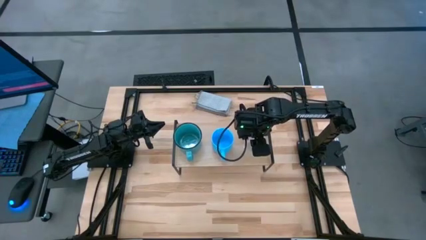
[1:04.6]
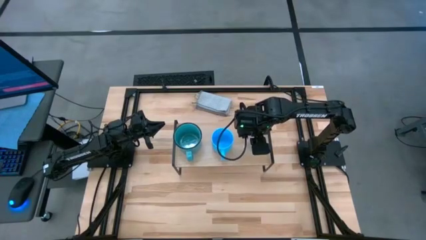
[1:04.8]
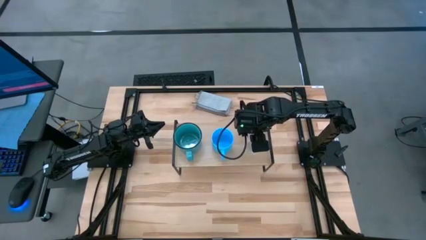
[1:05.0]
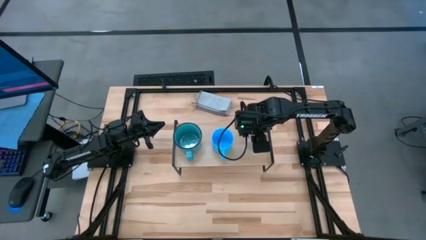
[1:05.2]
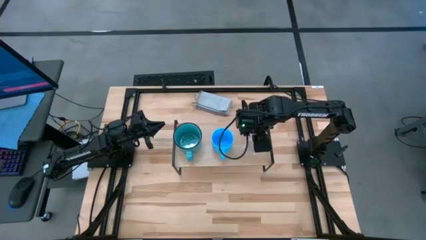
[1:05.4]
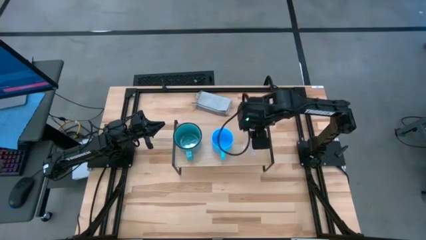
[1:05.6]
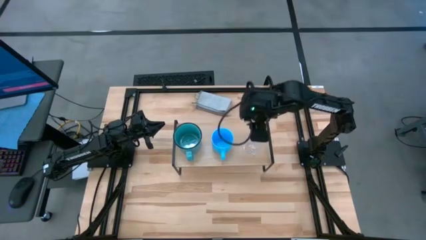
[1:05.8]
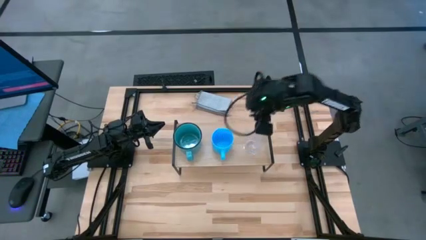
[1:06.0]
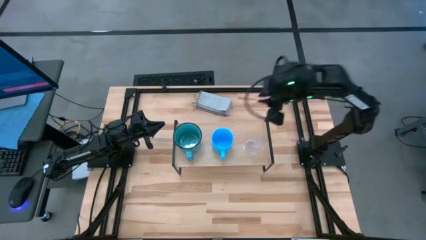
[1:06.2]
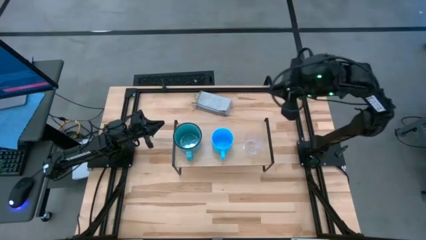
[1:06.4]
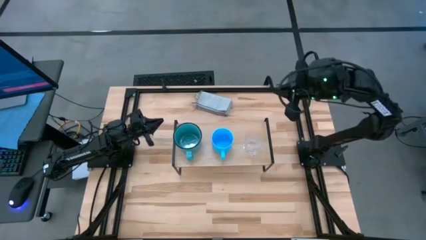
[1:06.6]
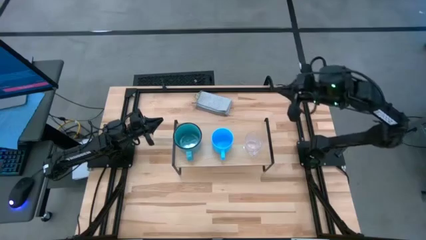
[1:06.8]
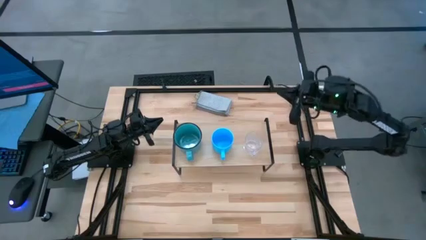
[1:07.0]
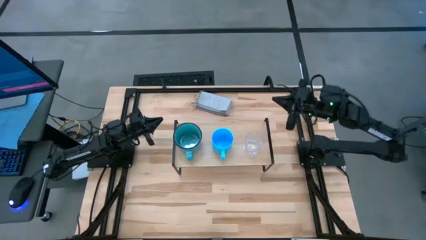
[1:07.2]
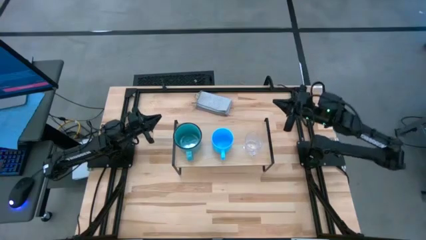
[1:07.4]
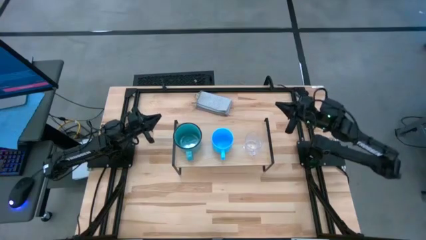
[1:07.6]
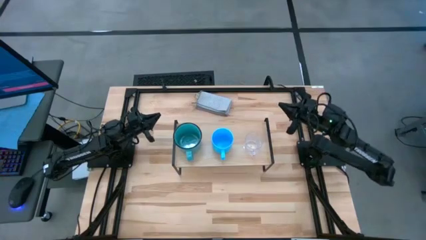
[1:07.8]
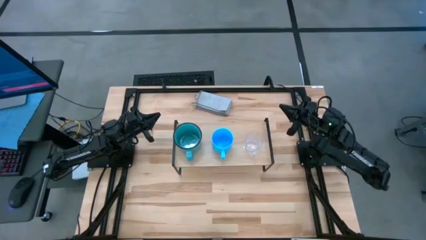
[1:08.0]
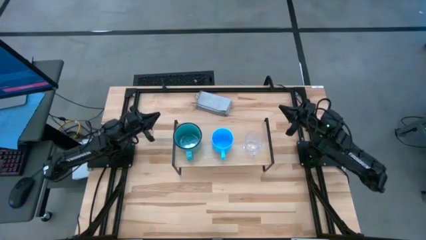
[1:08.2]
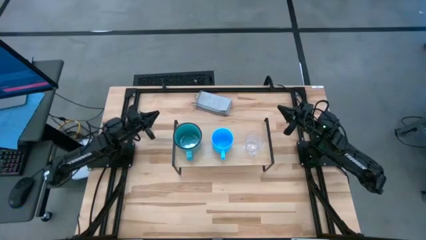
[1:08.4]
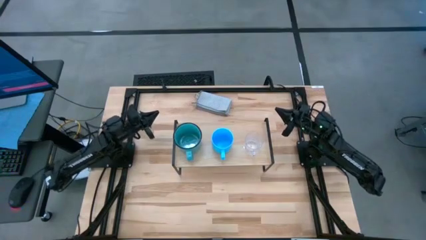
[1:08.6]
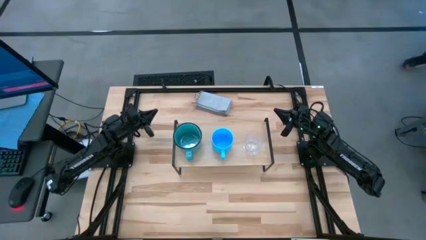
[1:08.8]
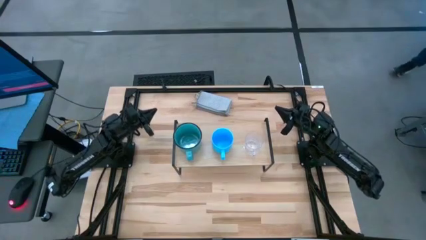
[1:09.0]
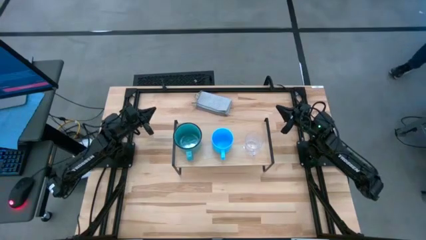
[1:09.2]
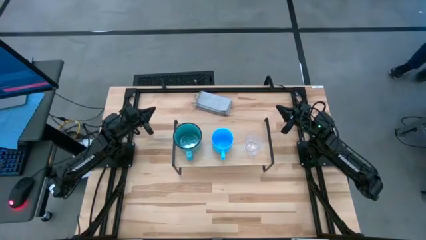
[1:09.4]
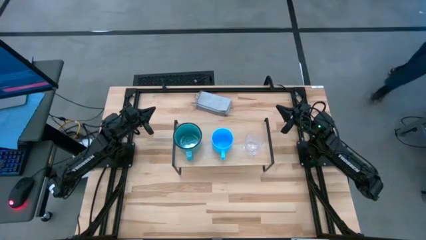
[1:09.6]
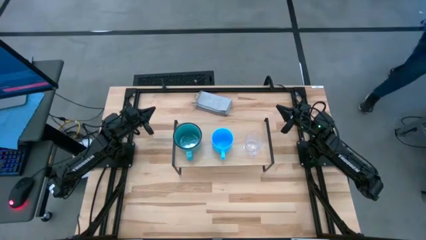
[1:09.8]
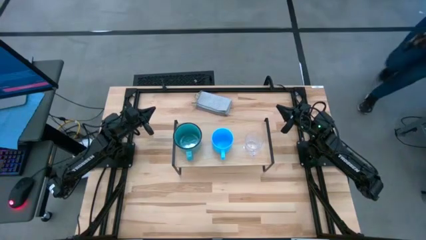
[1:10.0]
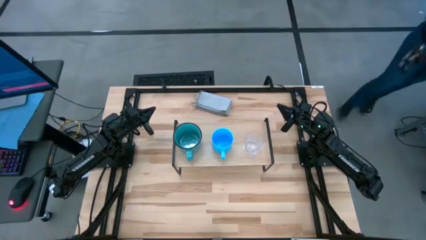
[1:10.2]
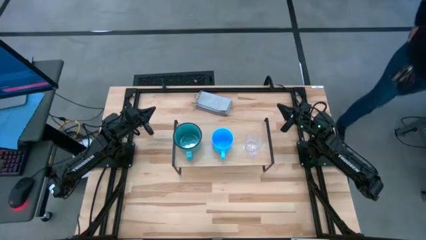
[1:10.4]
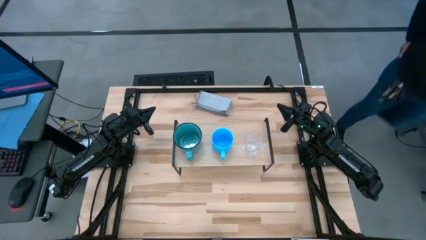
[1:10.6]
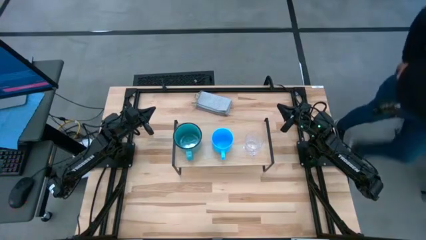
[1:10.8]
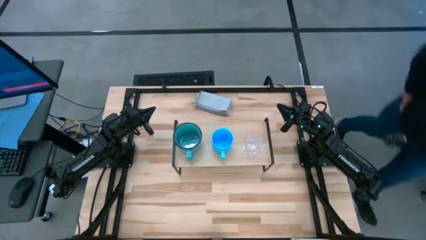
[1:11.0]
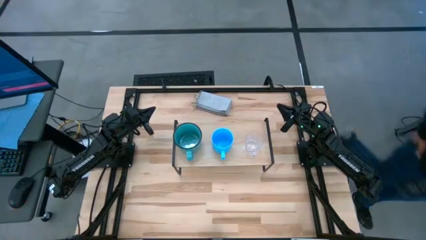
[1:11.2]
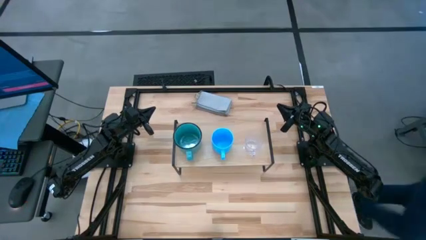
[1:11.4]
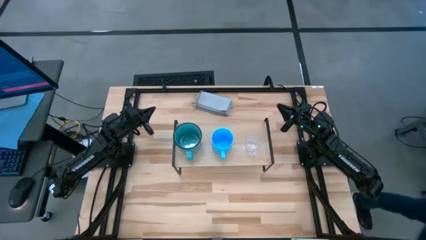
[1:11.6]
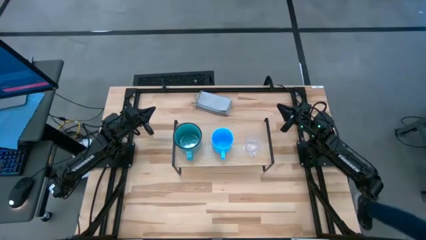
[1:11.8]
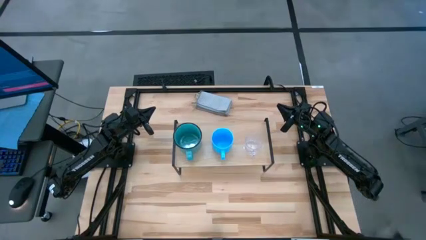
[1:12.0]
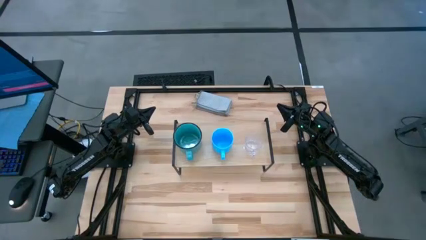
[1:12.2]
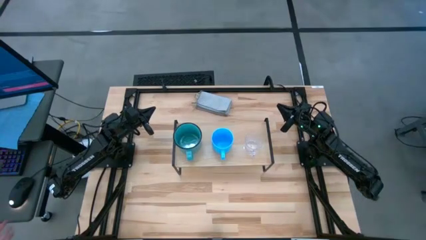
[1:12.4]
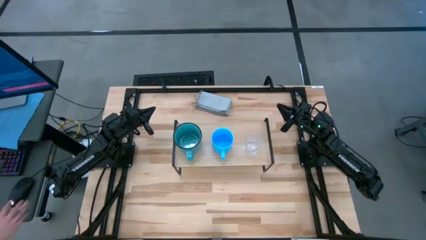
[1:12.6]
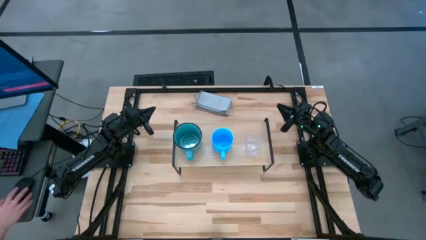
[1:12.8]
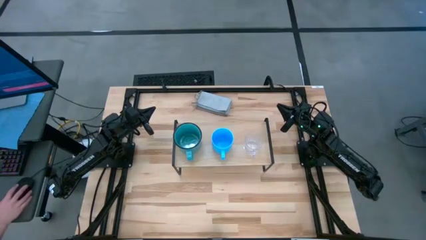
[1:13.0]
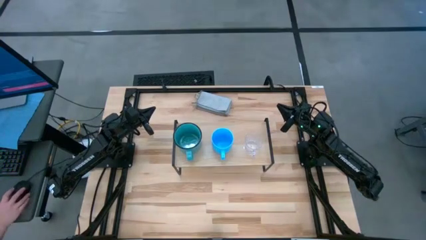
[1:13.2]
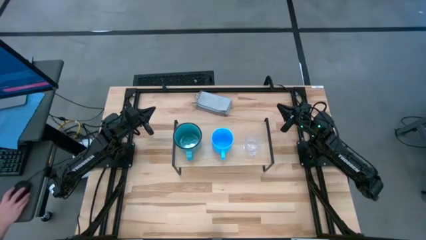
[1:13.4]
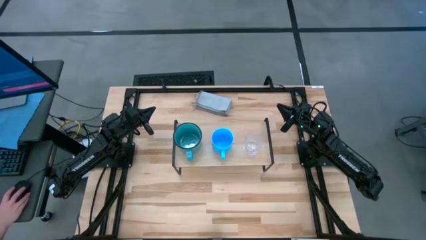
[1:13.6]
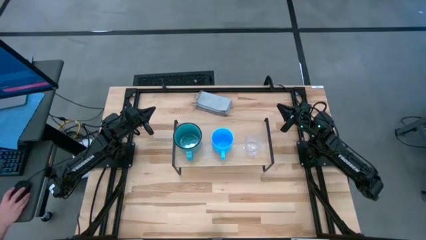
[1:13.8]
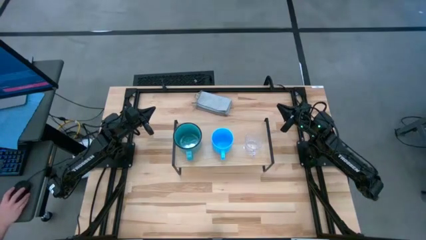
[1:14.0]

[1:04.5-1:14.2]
Task: Stack small to large cups/mugs on shelf
Return to Home Position
